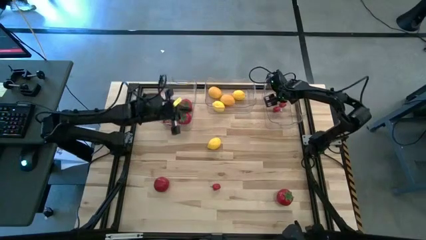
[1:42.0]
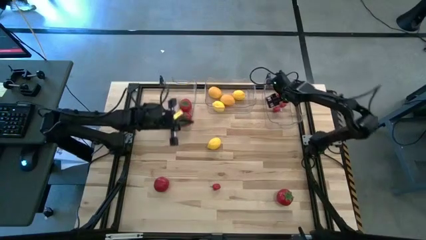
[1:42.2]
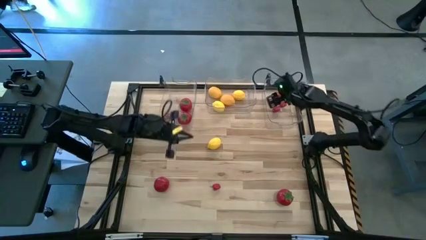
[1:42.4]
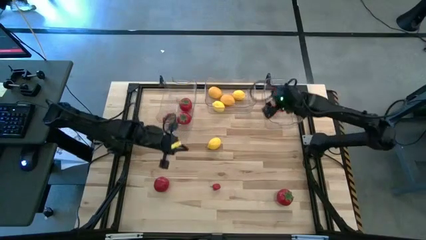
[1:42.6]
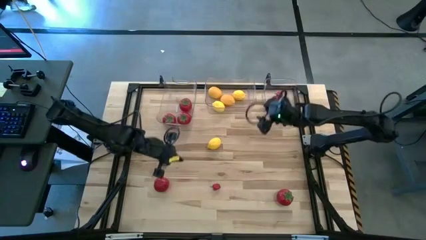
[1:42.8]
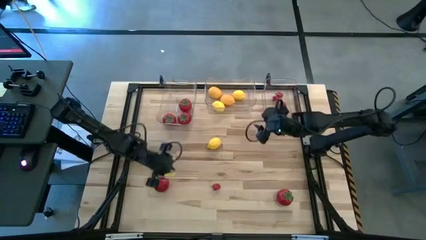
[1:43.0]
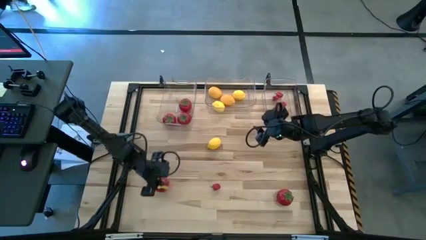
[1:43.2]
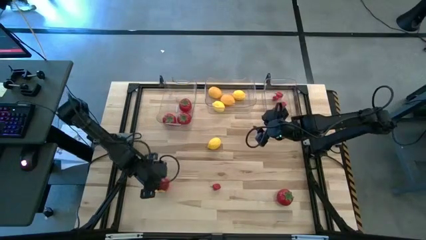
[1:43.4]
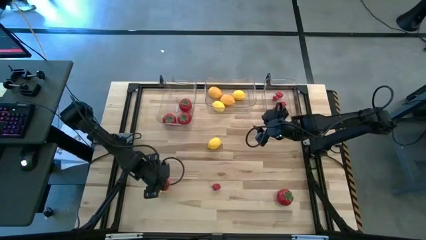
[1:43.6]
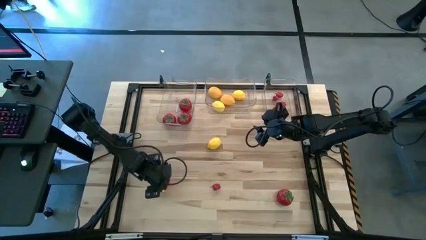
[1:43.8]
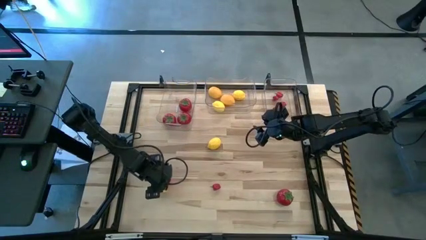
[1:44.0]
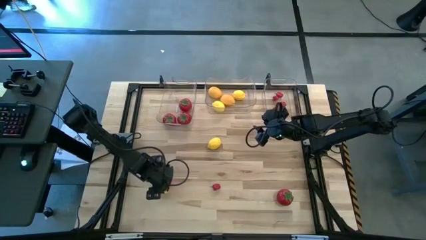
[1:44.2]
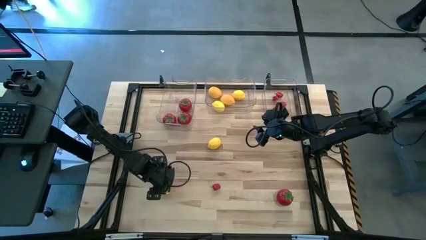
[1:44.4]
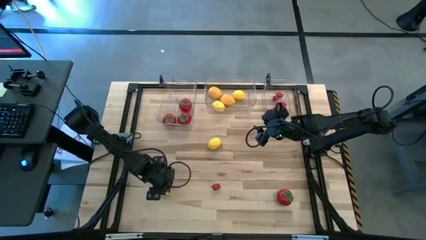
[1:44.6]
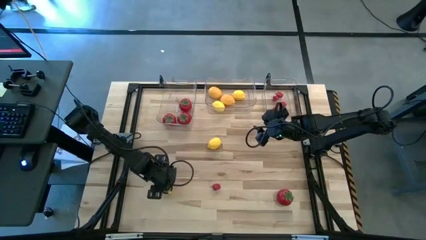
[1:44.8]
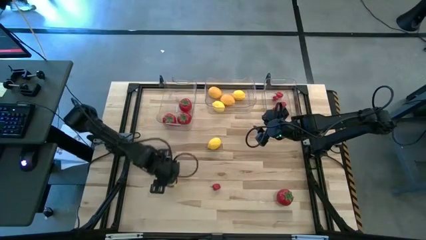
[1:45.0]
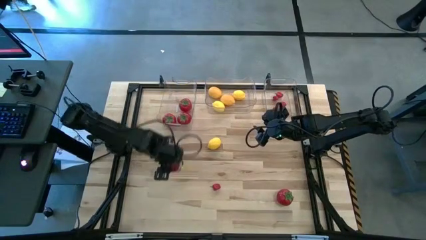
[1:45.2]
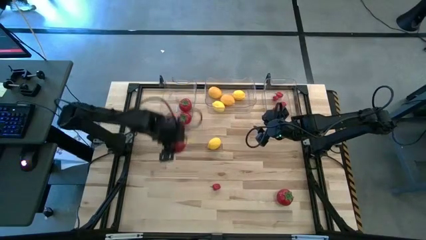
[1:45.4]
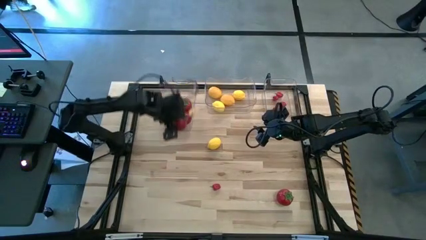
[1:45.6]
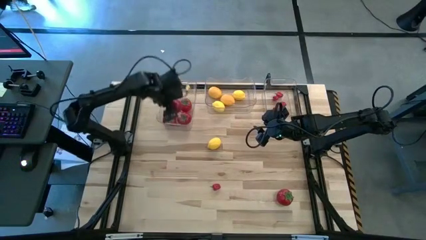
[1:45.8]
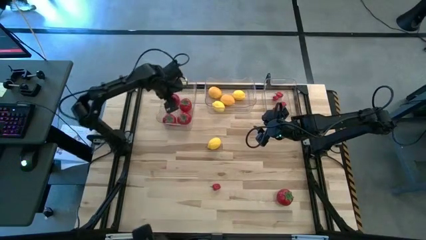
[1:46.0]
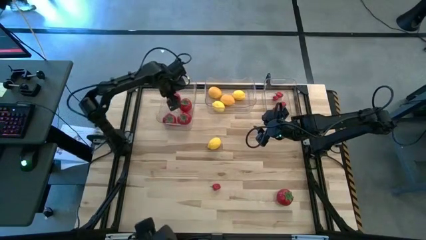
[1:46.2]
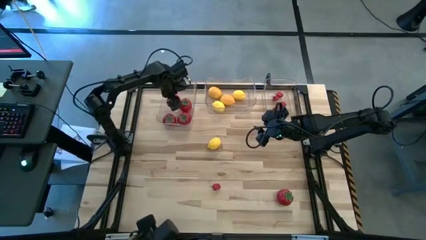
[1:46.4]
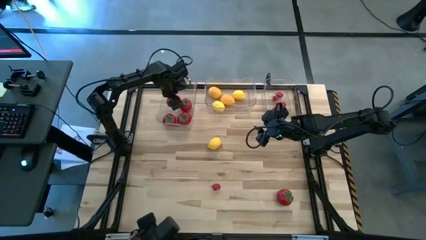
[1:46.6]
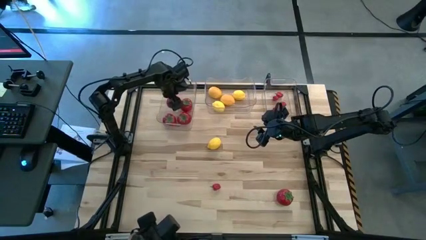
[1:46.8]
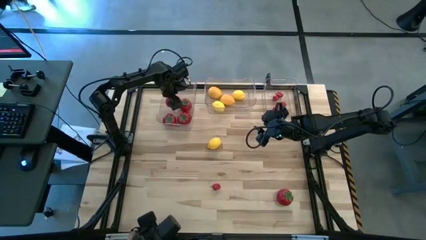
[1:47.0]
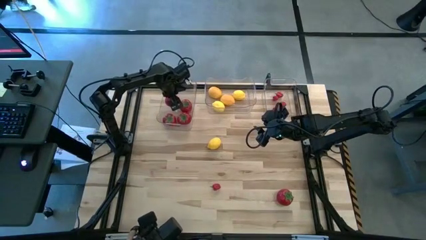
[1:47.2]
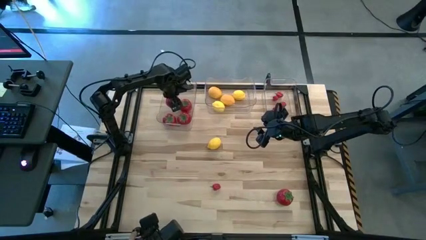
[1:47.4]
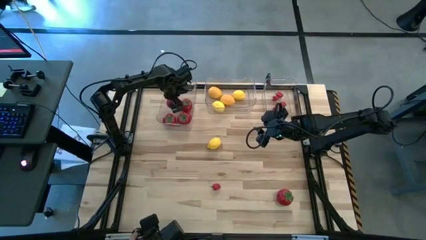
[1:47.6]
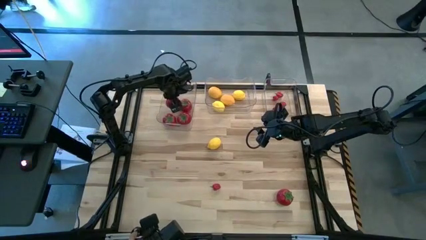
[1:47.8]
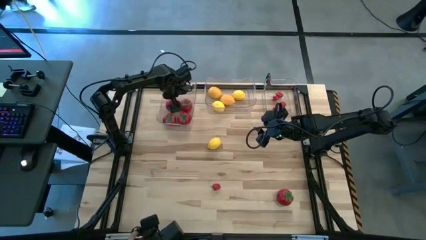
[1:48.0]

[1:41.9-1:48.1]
Task: Sort produce into baskets
Put the red tomato into the left transparent bin

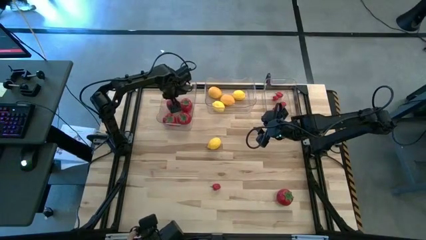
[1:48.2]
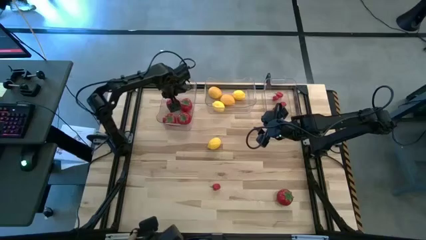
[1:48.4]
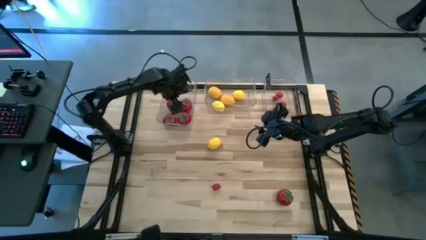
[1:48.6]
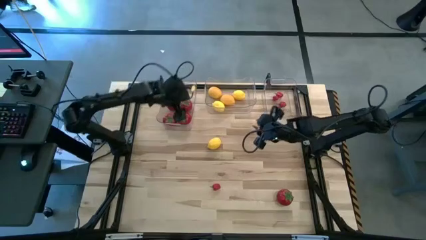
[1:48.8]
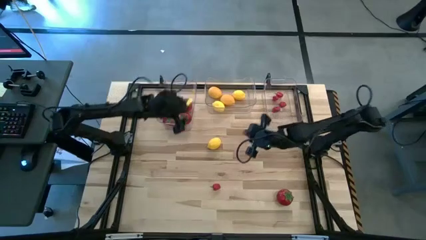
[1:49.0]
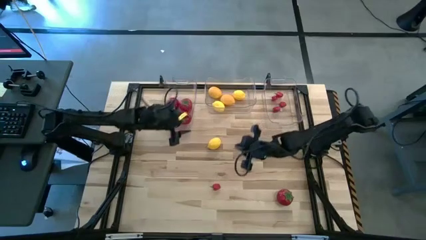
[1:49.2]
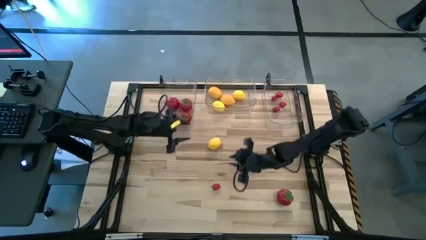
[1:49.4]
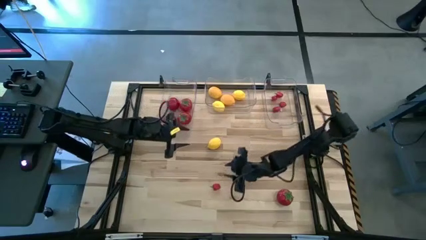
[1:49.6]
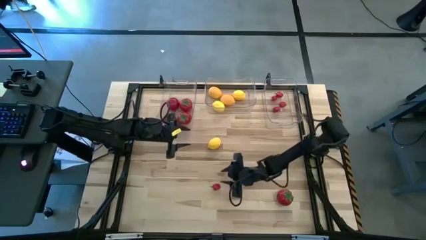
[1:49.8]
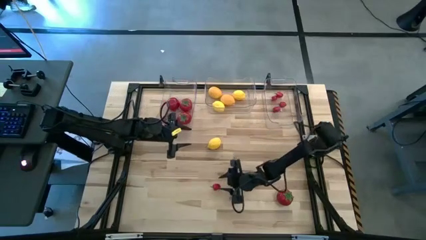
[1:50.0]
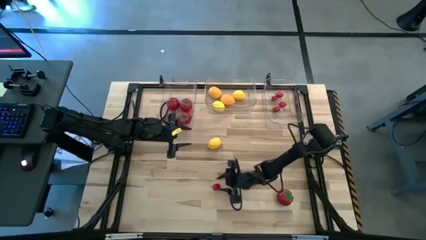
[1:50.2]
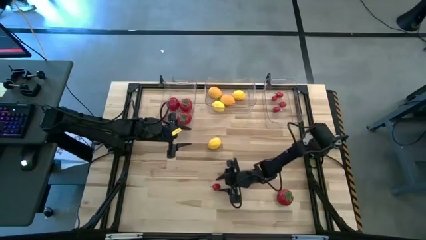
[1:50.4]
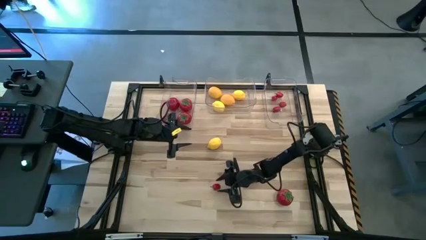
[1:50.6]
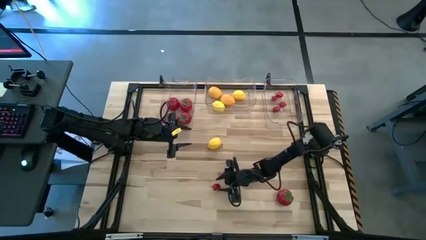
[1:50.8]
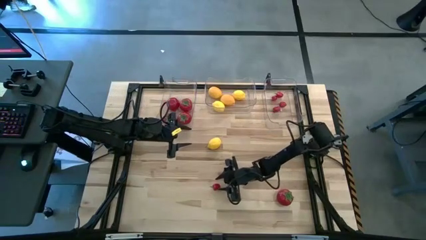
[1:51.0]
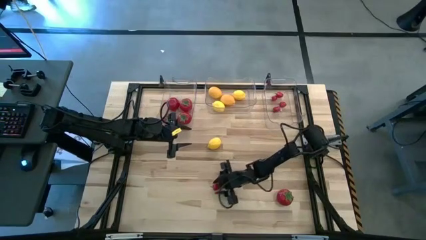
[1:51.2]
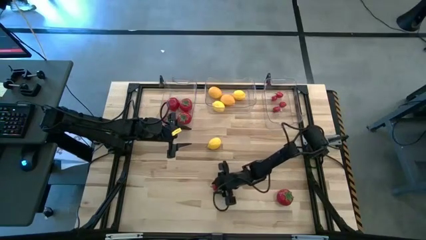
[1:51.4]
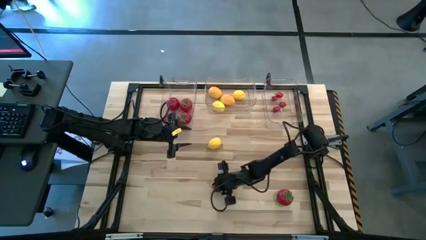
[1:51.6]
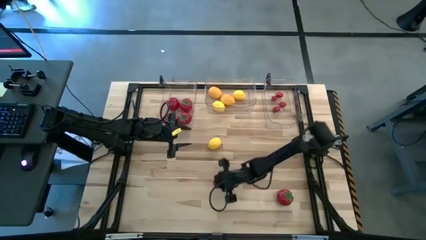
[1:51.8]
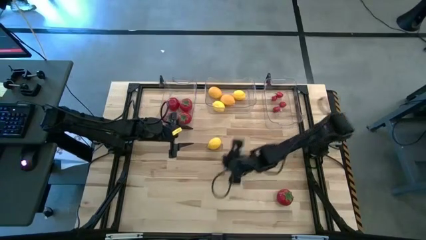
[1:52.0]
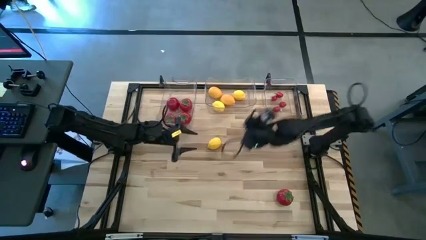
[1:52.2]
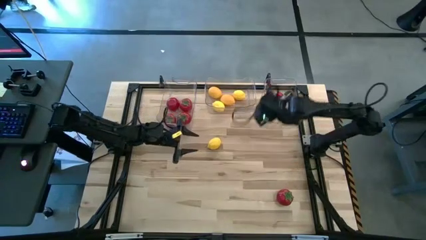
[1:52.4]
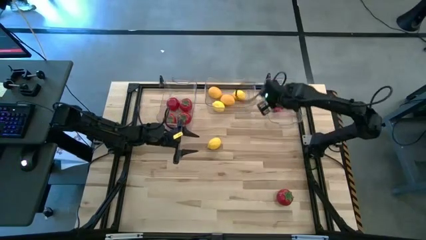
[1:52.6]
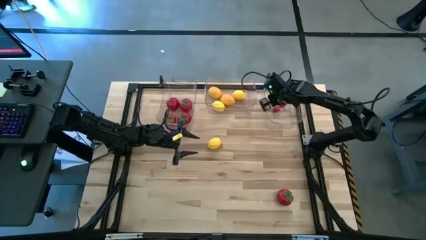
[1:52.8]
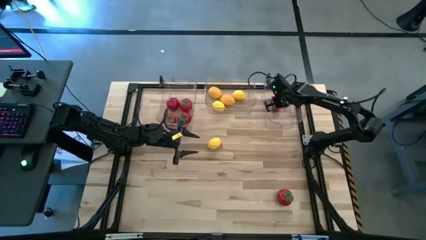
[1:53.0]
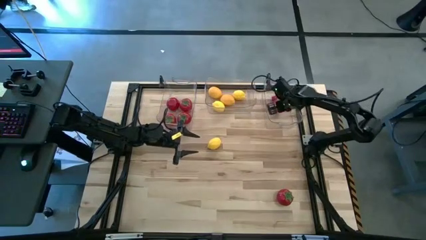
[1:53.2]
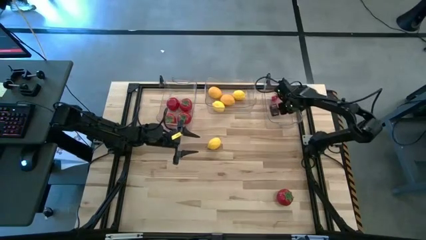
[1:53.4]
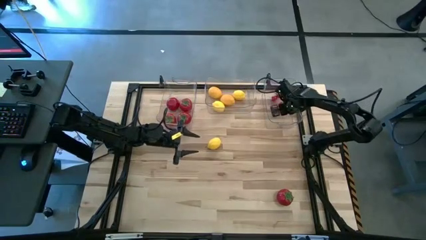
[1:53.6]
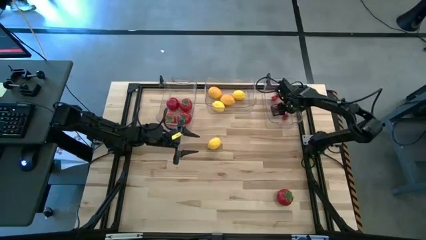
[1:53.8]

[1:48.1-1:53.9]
Put the red chili into the right transparent bin

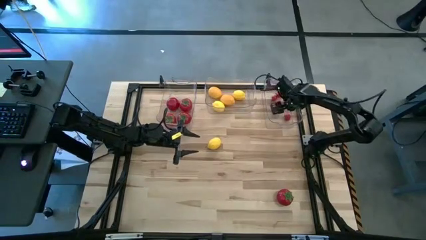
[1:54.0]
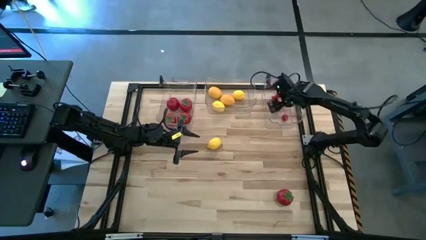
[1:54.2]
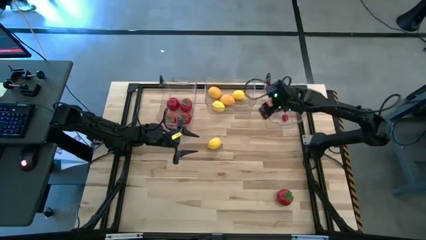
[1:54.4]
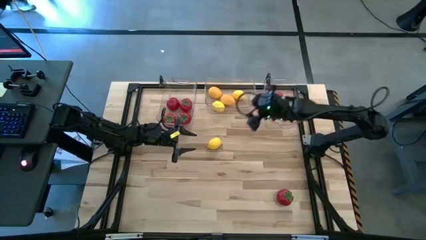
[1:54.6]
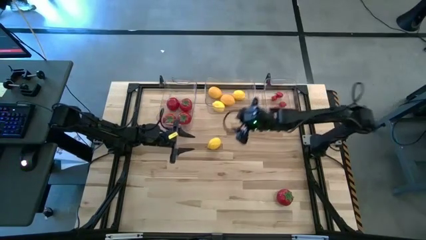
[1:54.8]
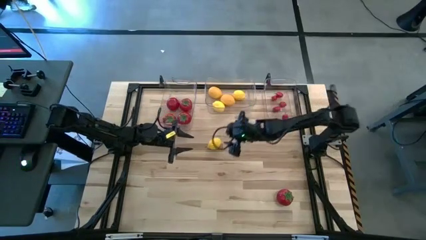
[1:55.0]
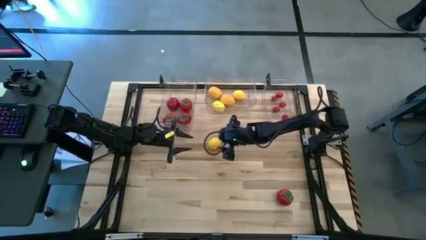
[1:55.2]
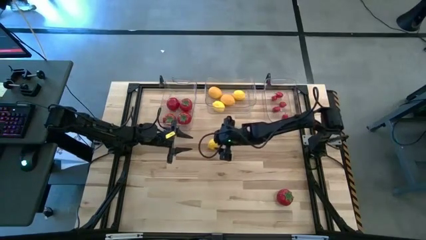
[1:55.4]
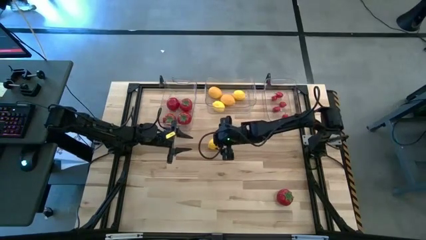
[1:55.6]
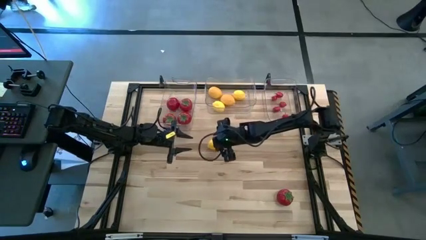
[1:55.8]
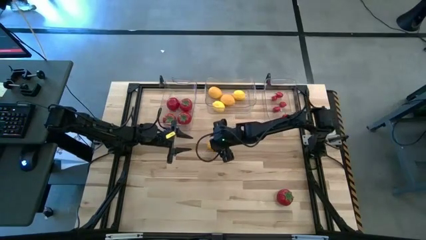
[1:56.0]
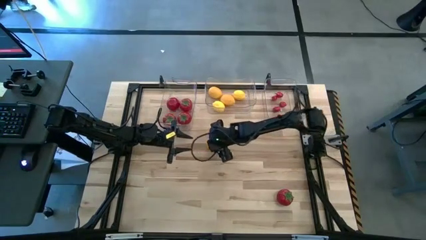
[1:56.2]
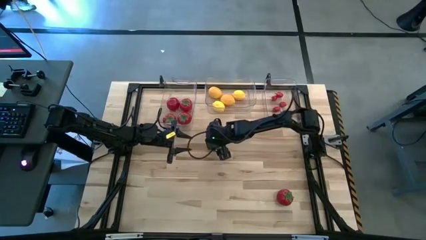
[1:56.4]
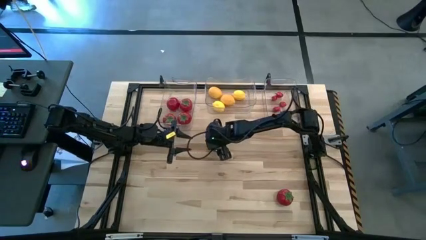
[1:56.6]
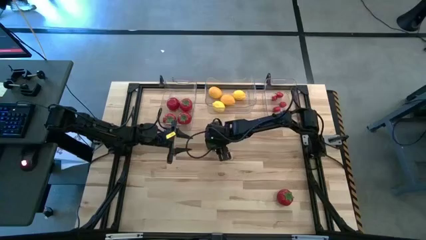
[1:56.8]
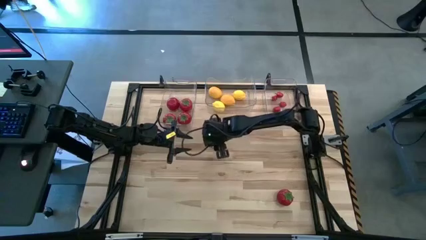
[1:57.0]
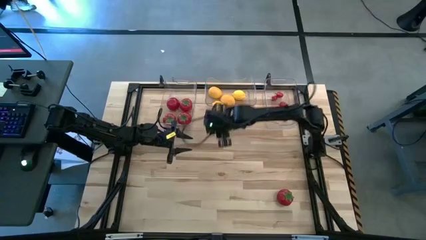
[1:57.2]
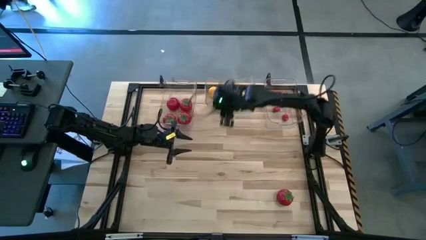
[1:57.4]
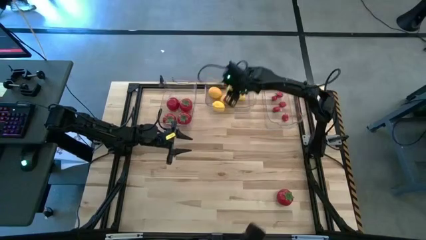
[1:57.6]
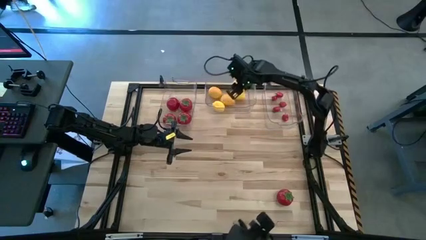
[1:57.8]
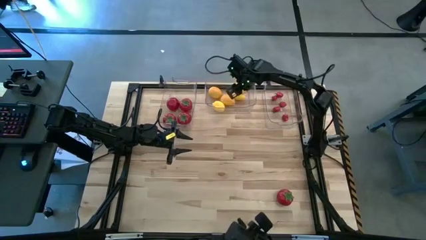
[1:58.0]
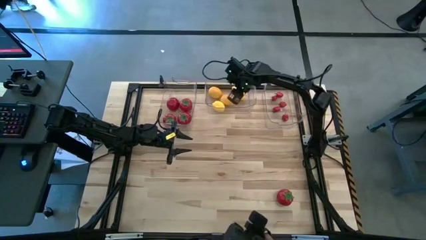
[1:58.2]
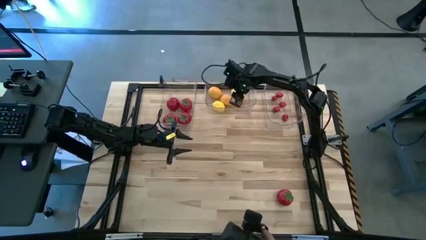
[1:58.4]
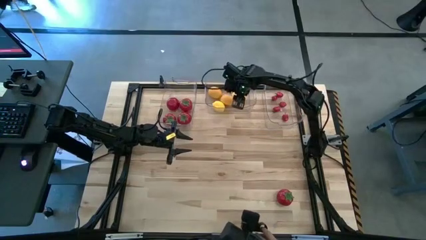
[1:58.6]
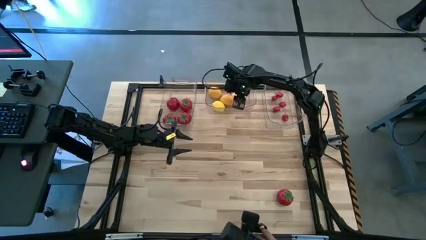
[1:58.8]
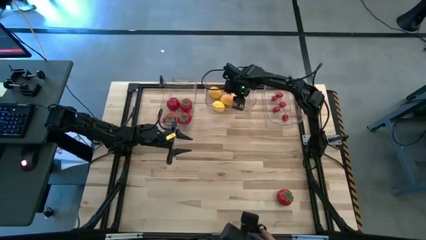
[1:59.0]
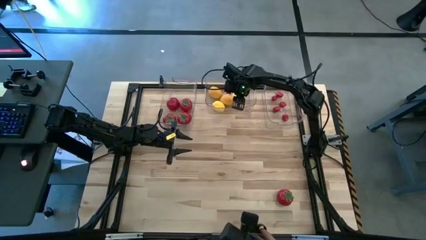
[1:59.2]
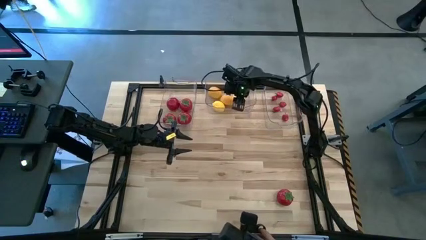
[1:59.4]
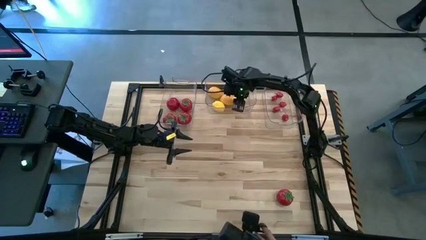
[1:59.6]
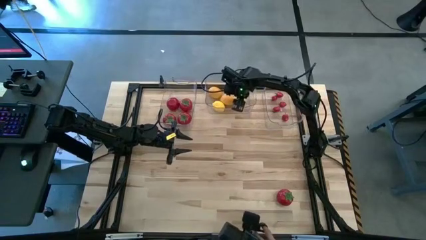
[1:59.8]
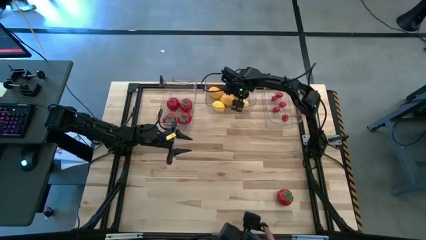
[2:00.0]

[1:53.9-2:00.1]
Put the yellow lemon into the center transparent bin
